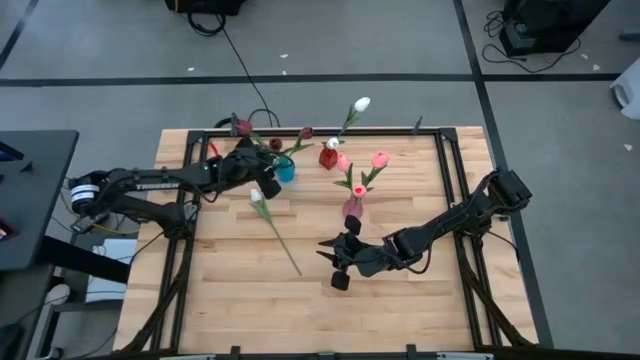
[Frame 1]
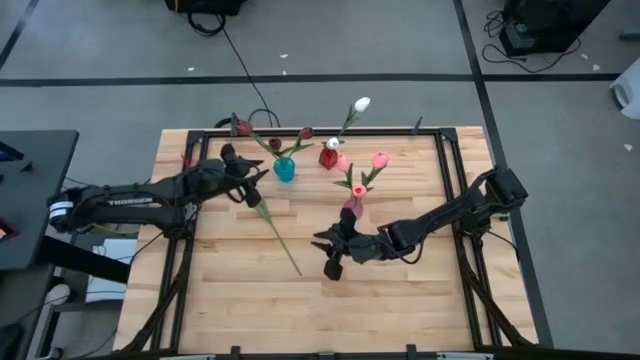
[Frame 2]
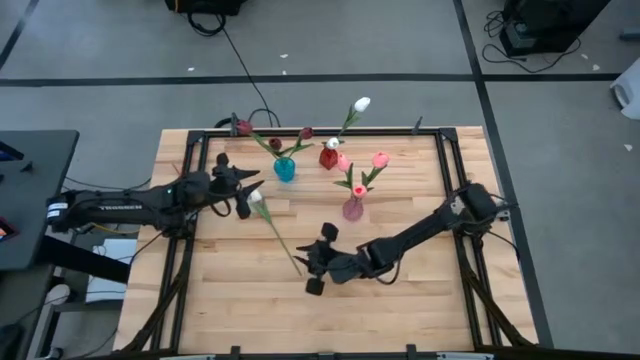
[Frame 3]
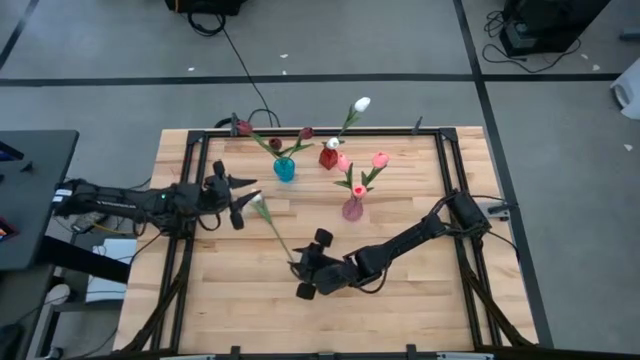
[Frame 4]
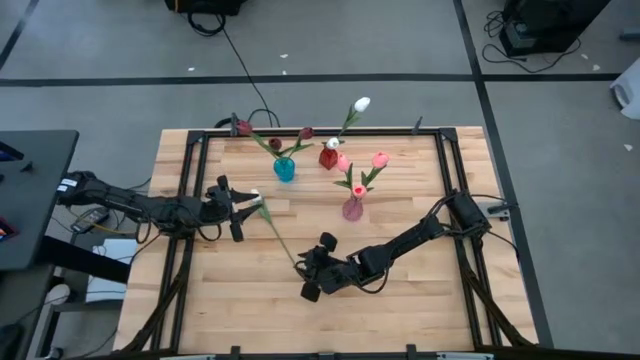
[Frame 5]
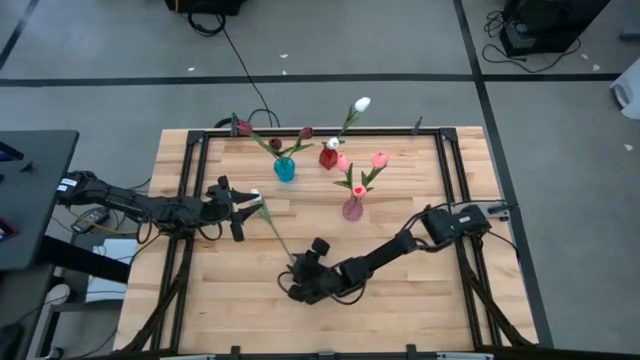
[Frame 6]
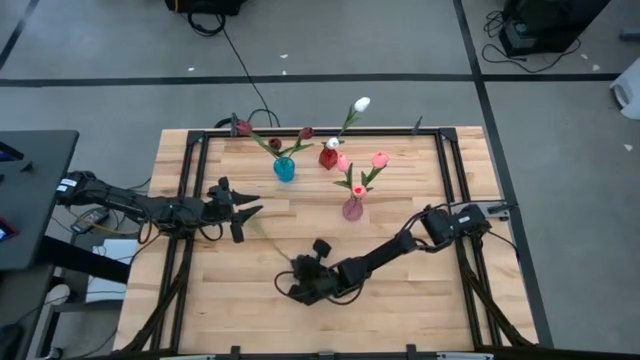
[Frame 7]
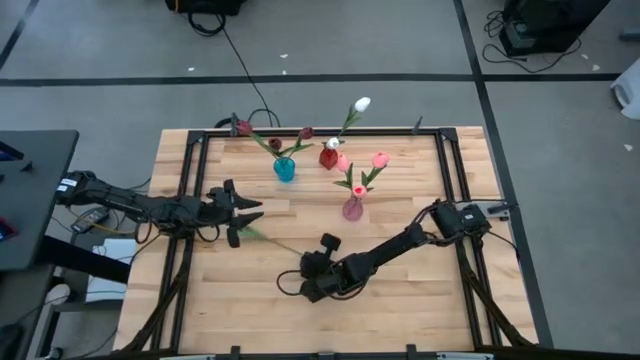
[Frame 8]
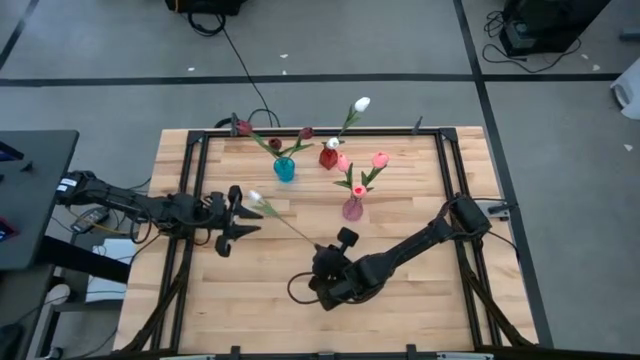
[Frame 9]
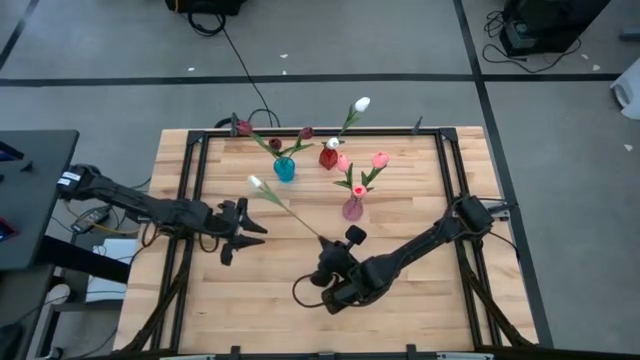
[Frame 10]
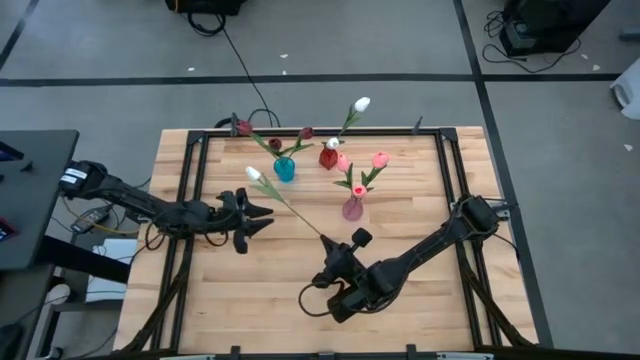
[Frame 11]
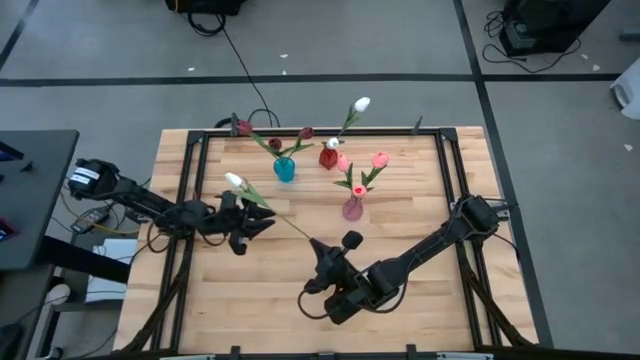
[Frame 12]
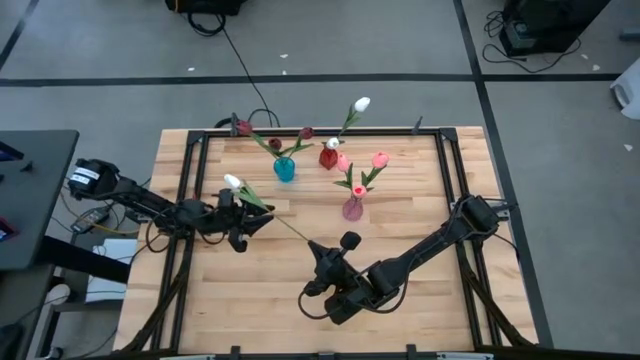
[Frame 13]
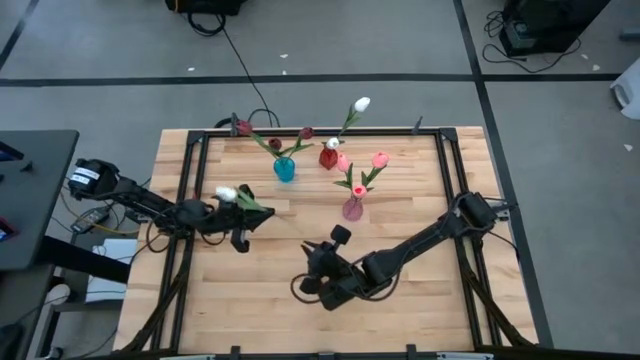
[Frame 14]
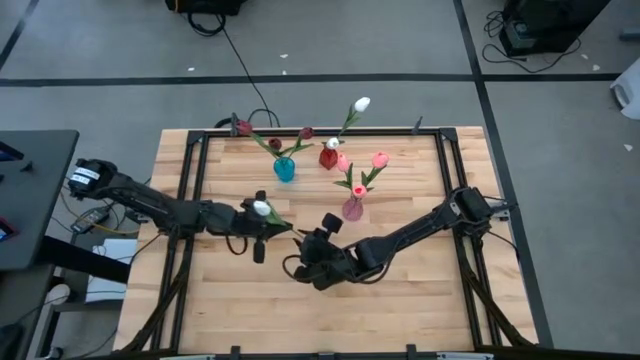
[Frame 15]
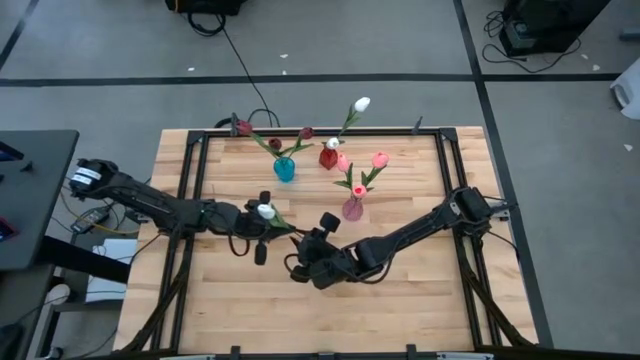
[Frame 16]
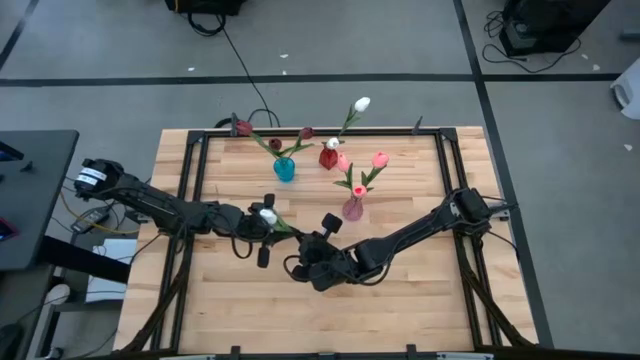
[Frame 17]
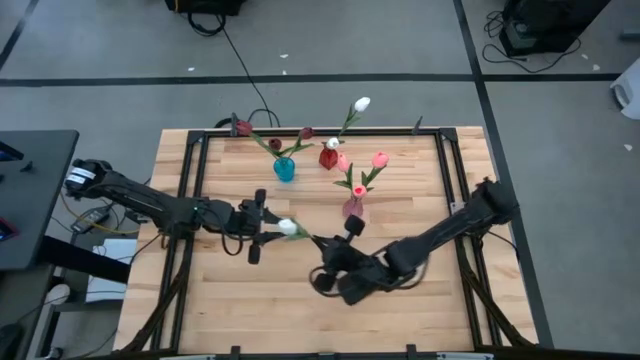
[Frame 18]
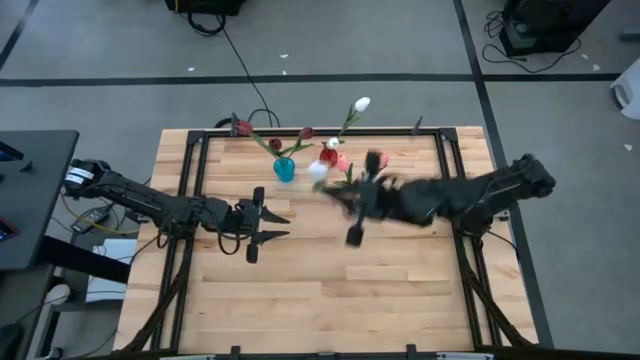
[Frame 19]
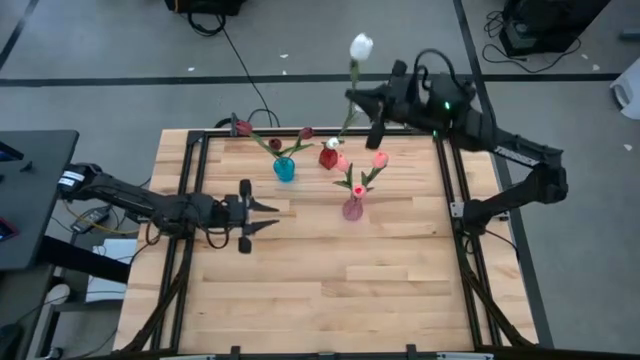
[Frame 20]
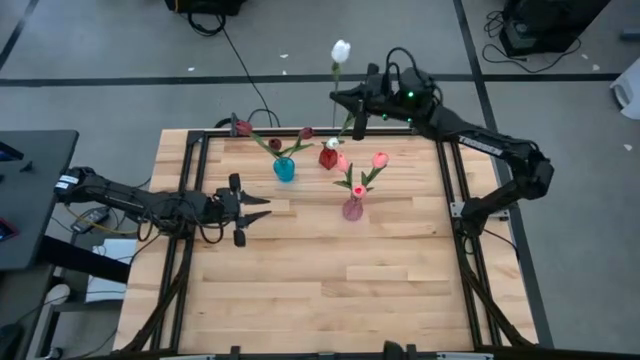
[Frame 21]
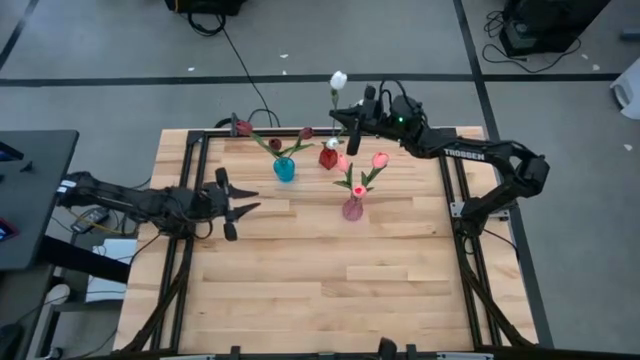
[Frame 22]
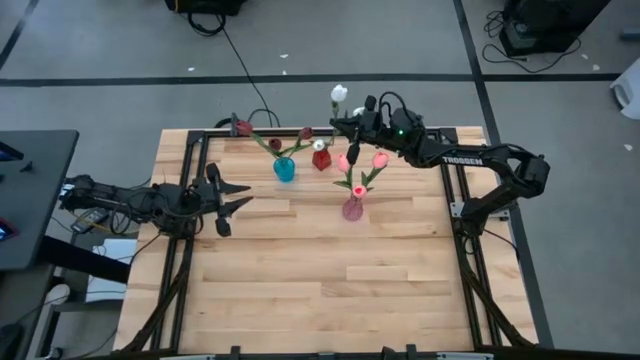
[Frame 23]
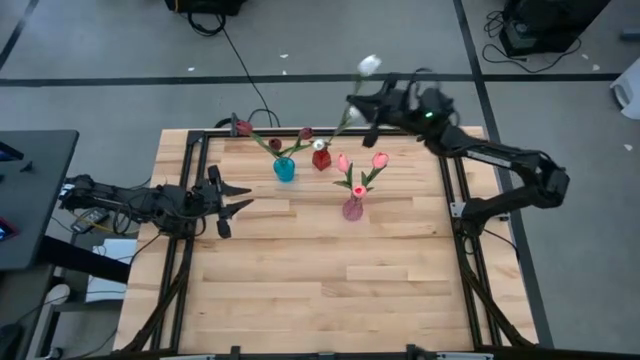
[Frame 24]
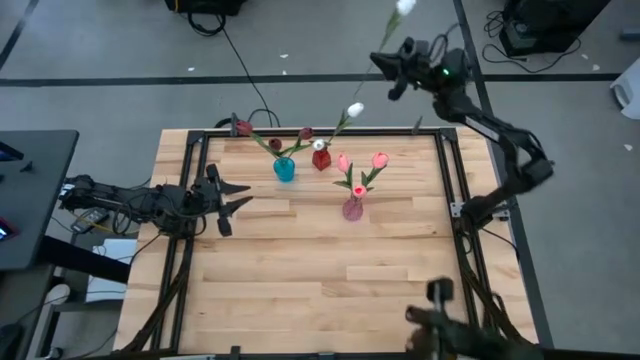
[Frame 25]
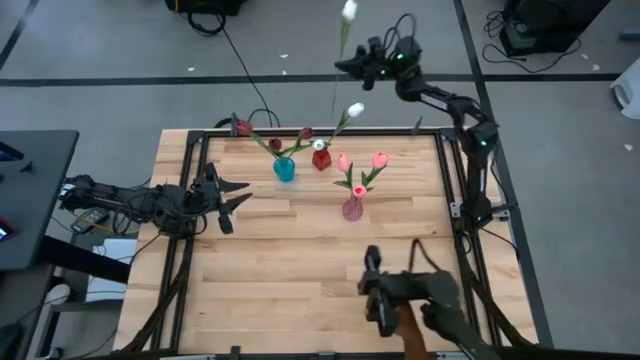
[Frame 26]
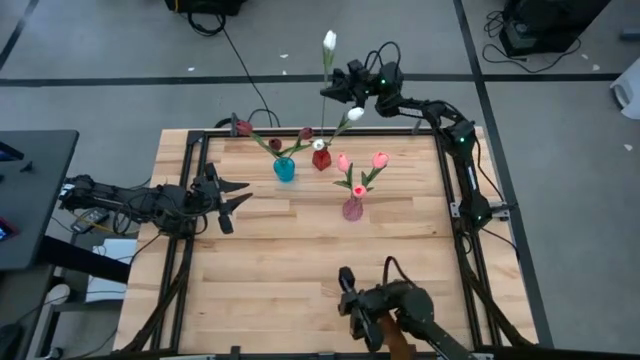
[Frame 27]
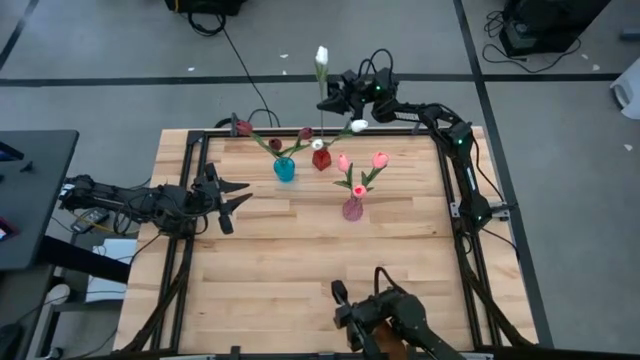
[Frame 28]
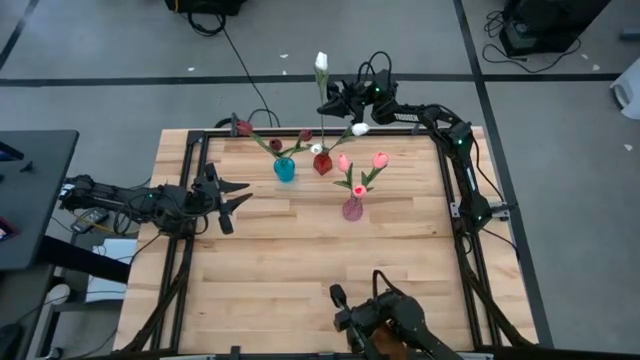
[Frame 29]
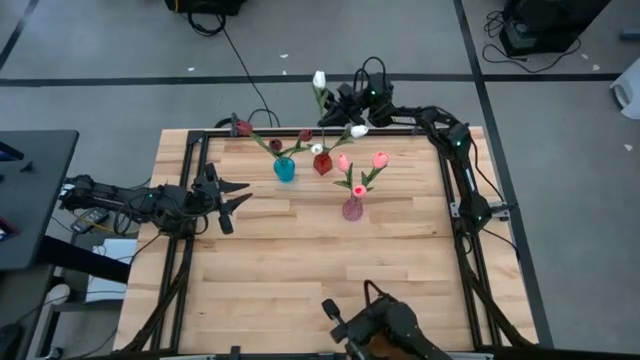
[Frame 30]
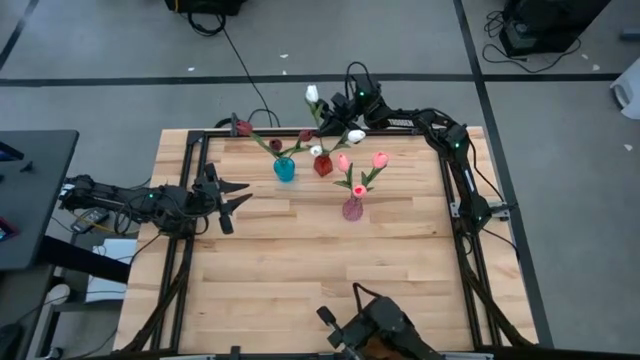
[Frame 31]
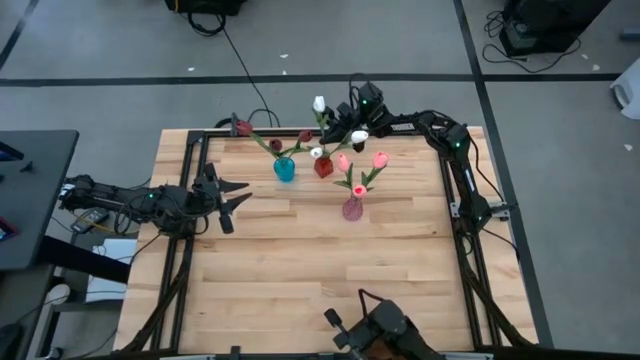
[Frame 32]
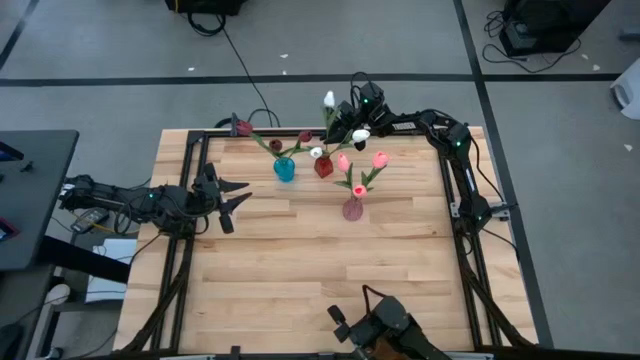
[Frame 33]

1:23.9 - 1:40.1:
Task: Sort flowers into vase by color
Put the white tulip into the red vase

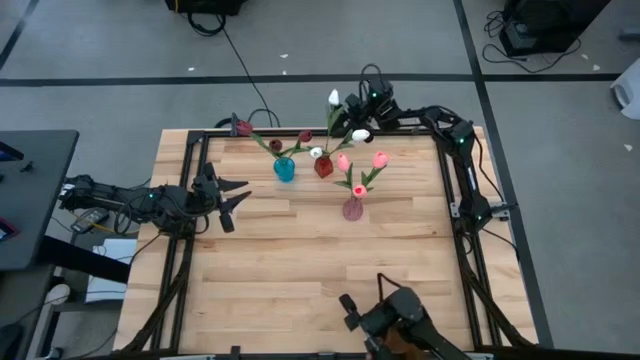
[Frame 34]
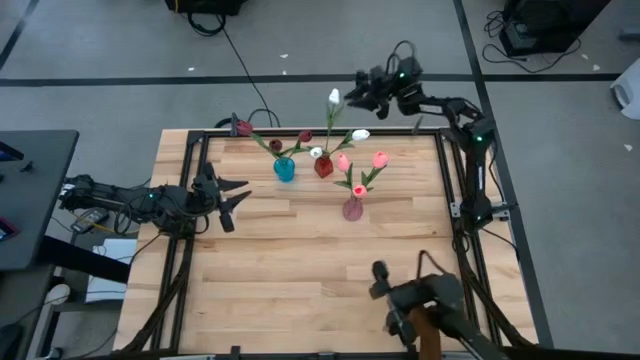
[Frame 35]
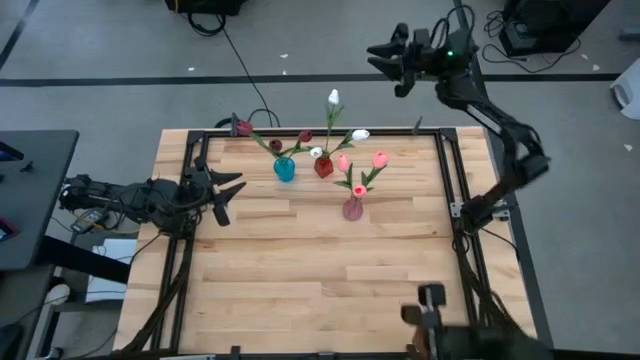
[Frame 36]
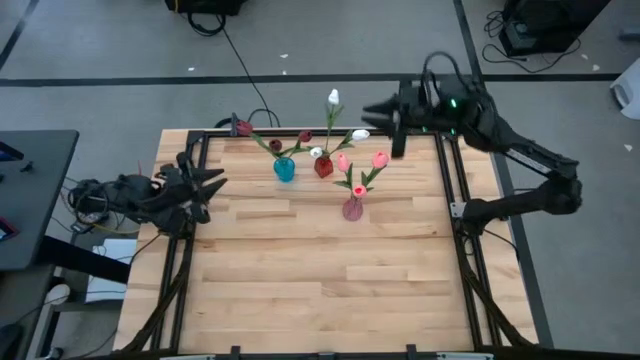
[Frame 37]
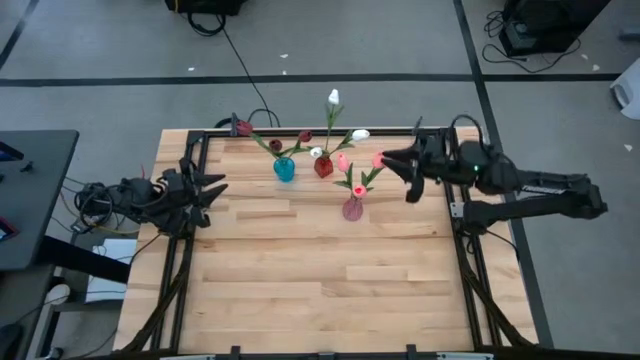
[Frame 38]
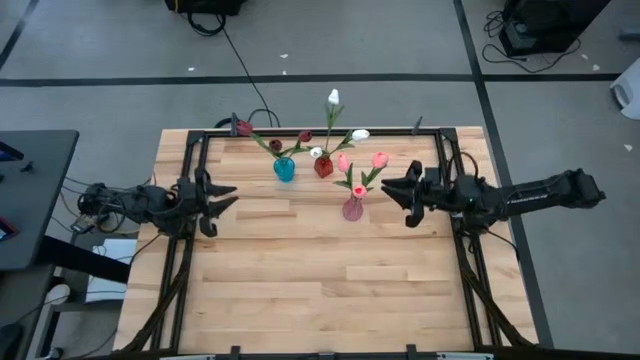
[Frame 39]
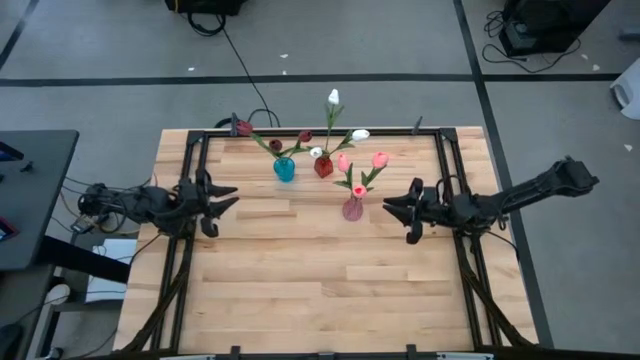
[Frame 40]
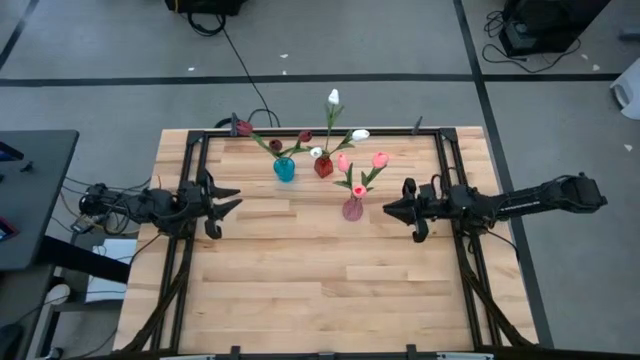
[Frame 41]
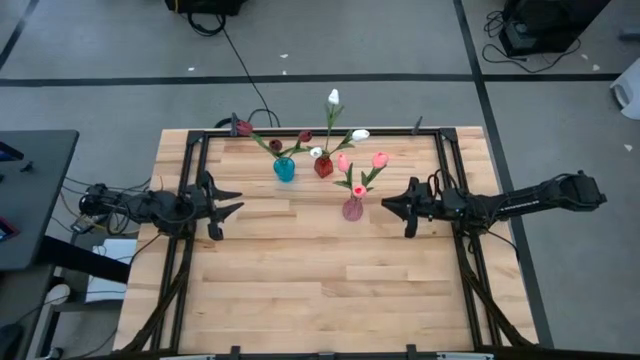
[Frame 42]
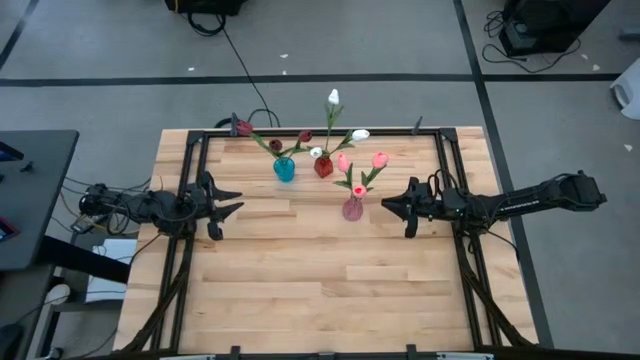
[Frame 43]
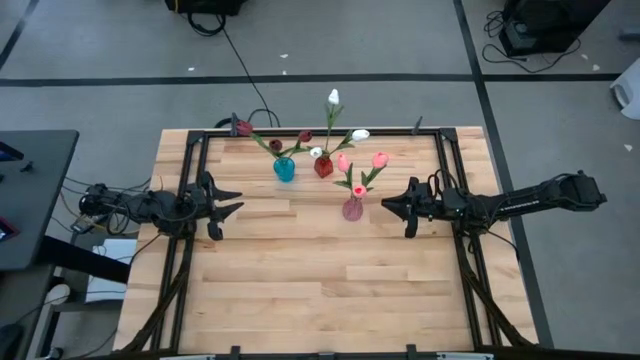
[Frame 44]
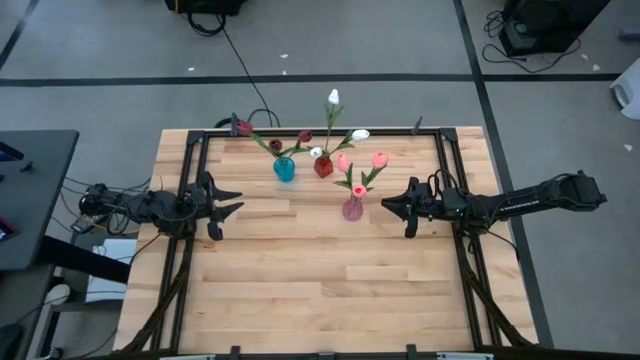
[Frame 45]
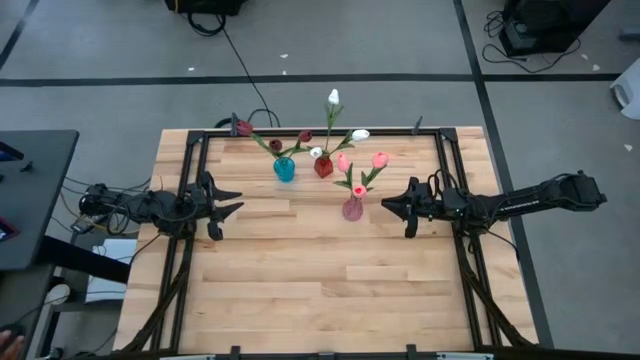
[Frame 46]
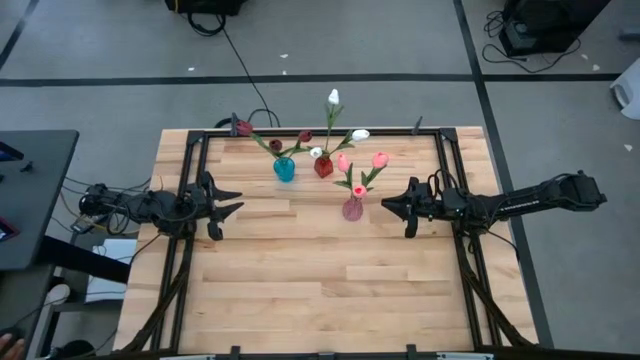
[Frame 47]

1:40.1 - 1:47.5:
Return to Home Position
